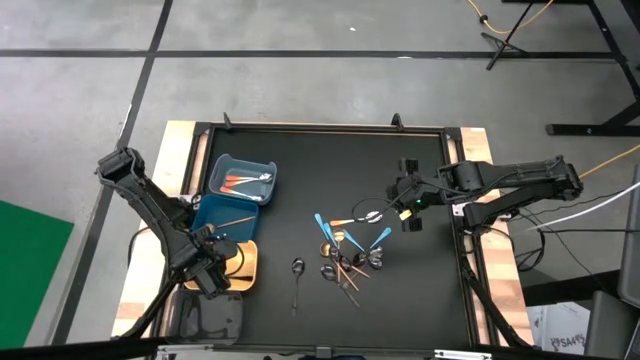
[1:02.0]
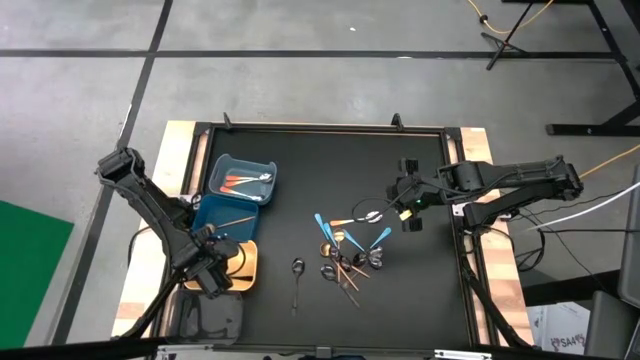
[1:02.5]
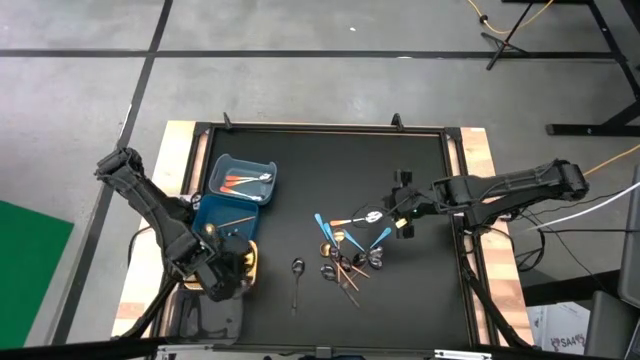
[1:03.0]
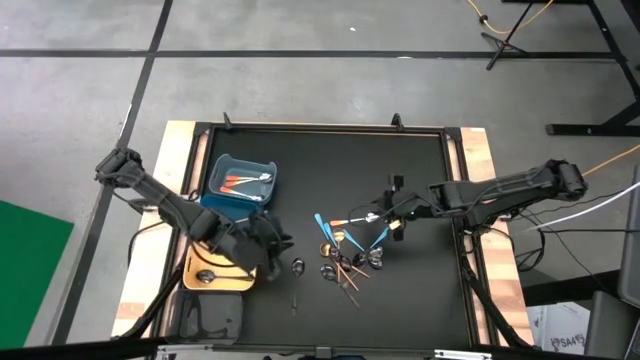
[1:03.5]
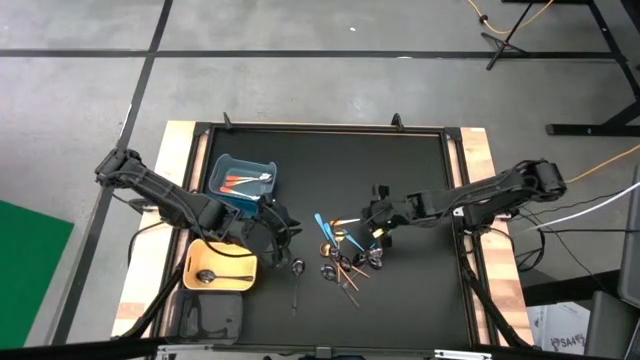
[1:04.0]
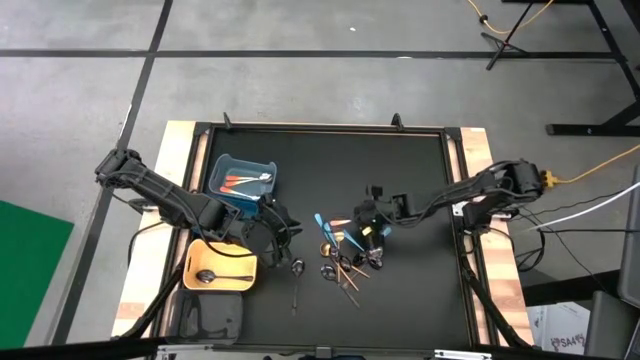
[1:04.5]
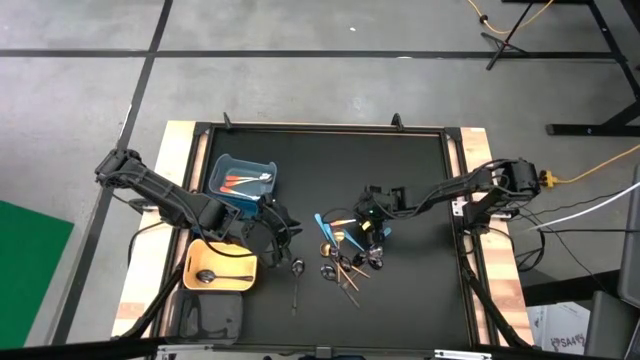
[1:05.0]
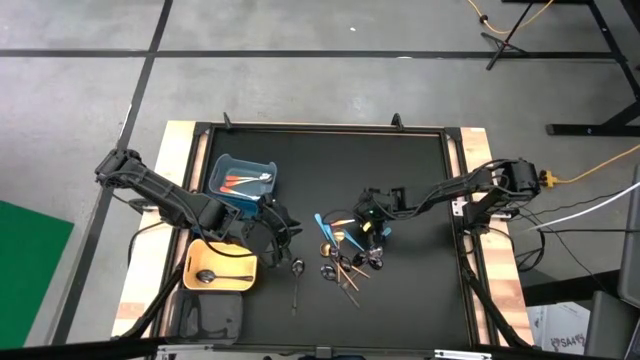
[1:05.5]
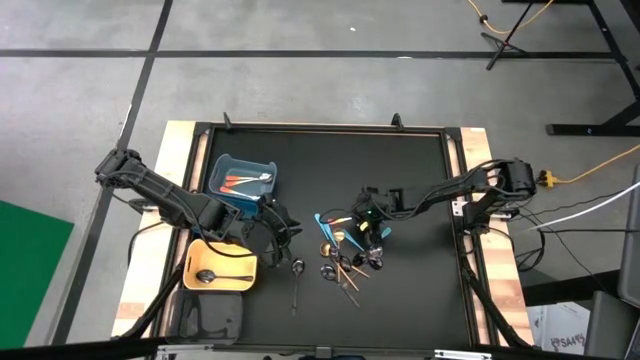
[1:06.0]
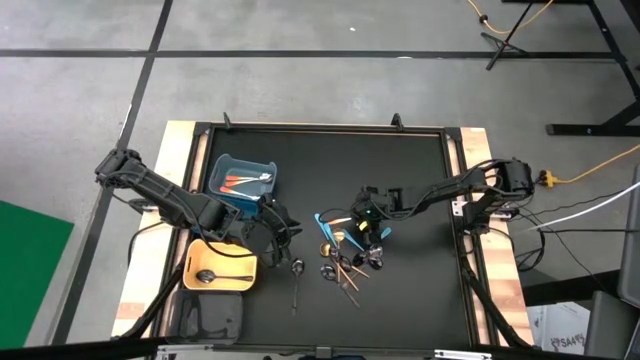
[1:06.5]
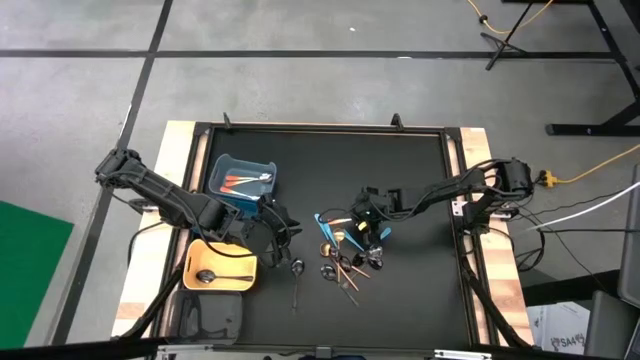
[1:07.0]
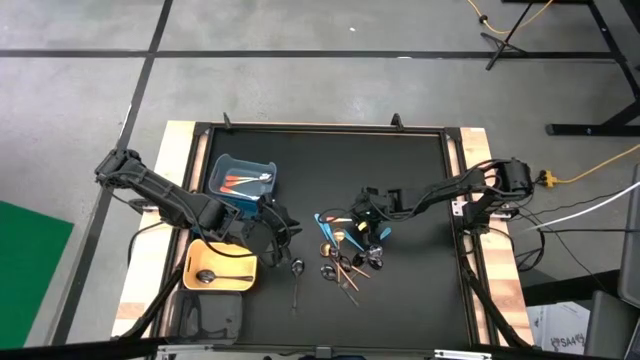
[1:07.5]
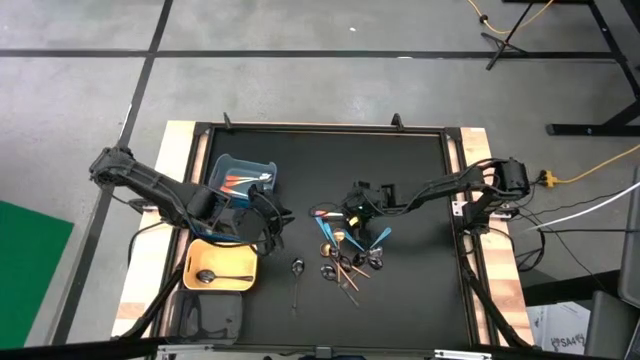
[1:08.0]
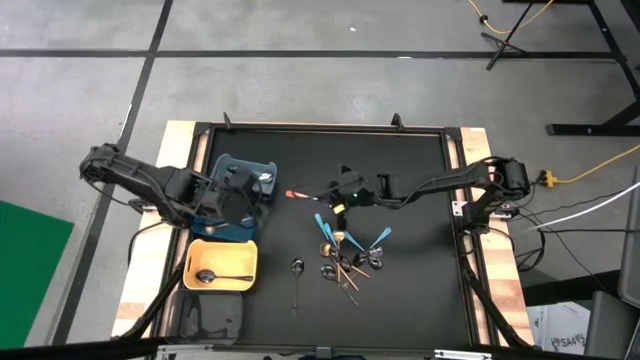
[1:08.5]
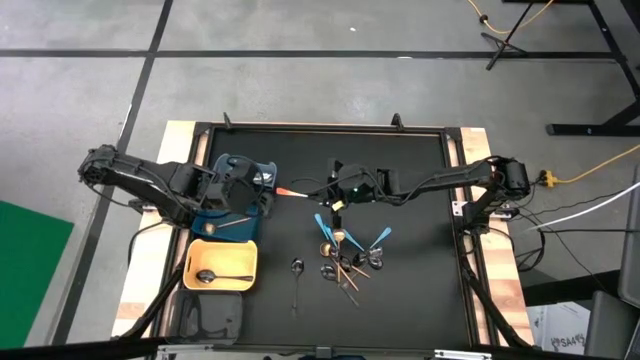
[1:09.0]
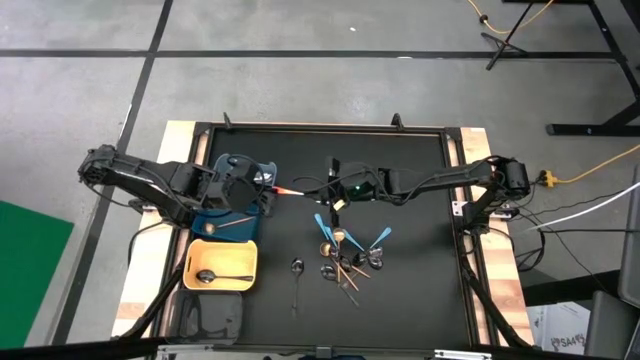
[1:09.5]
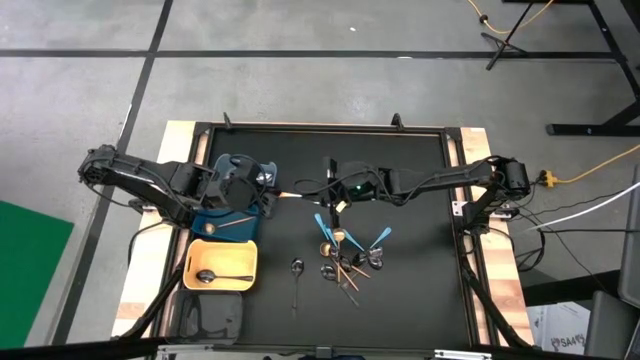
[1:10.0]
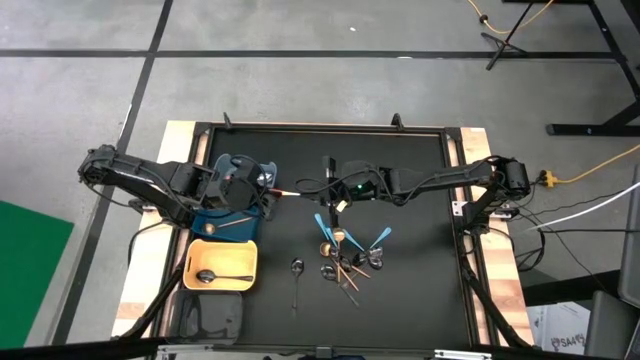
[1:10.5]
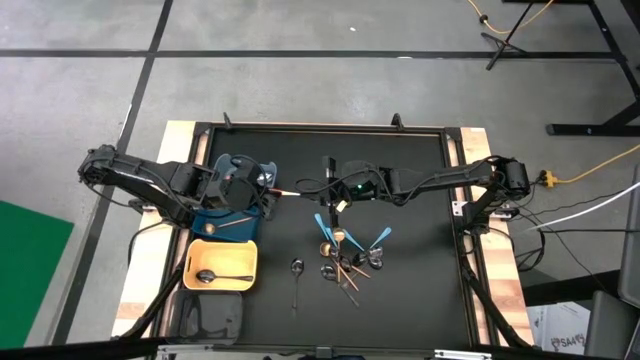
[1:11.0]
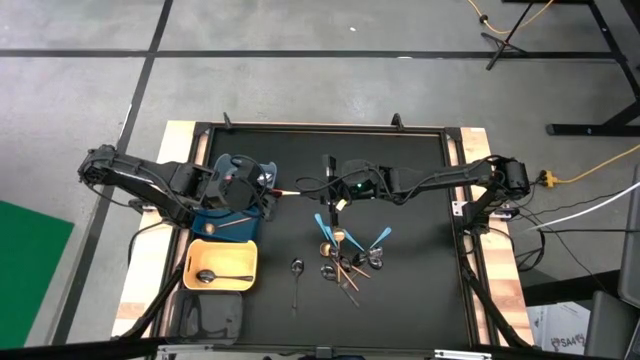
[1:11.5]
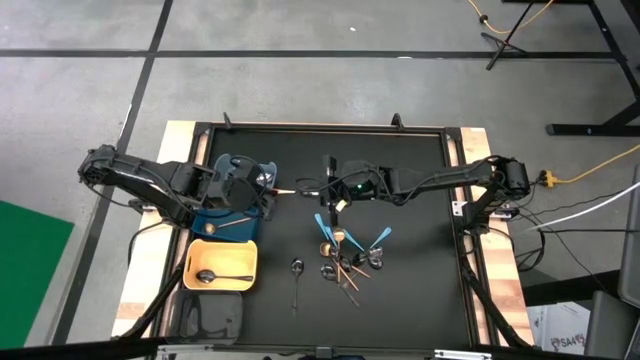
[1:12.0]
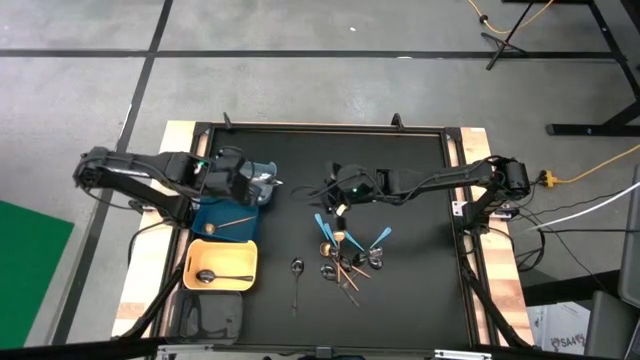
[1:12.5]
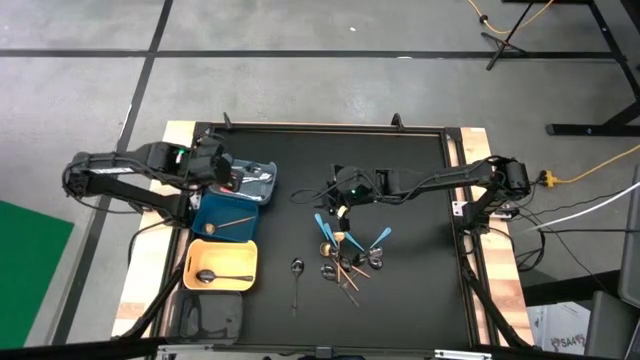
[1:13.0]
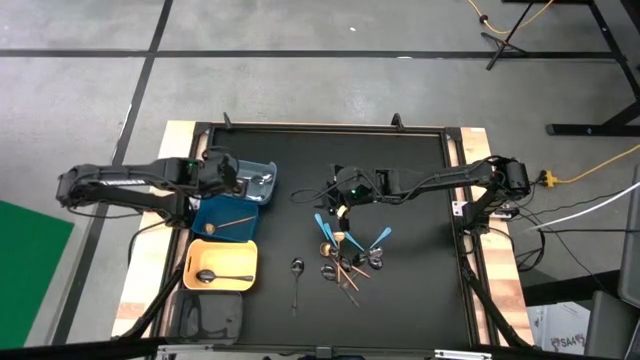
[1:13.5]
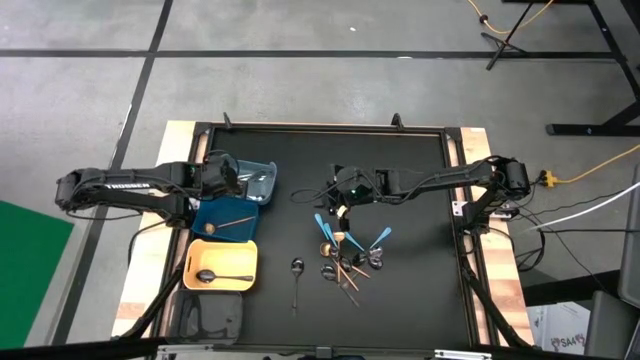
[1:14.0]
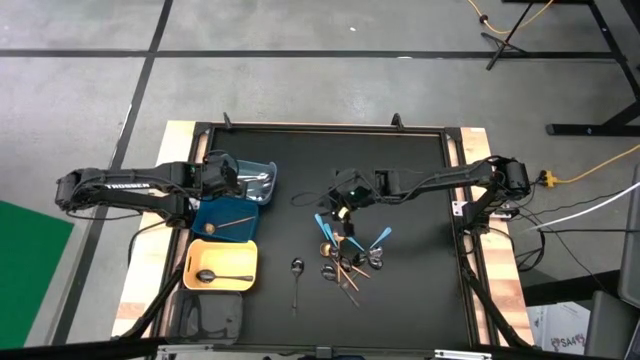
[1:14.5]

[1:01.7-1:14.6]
Task: Sort silverware by color (type)
Put the orange spoon into the light green bin

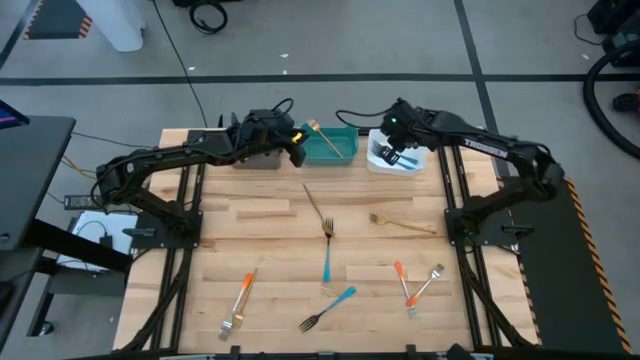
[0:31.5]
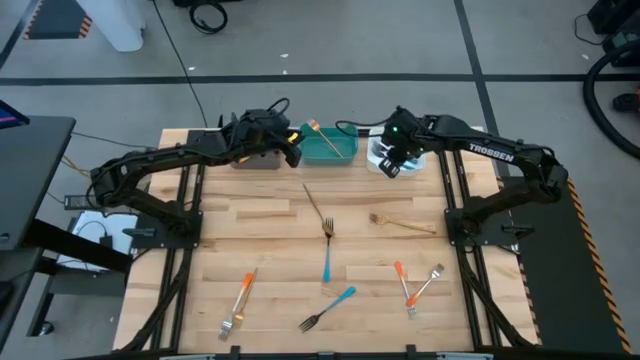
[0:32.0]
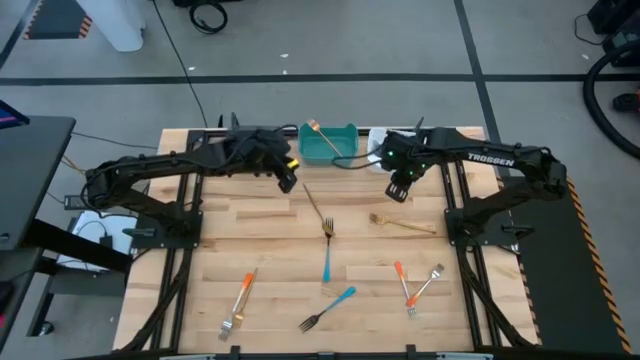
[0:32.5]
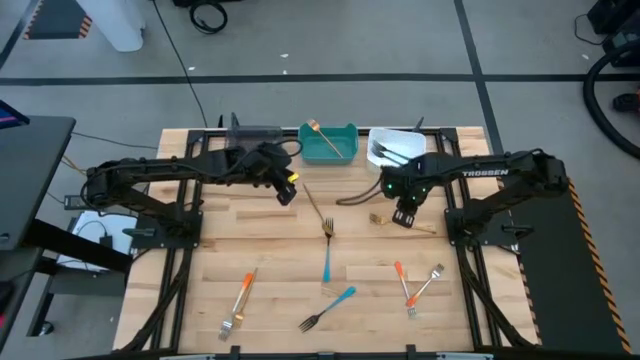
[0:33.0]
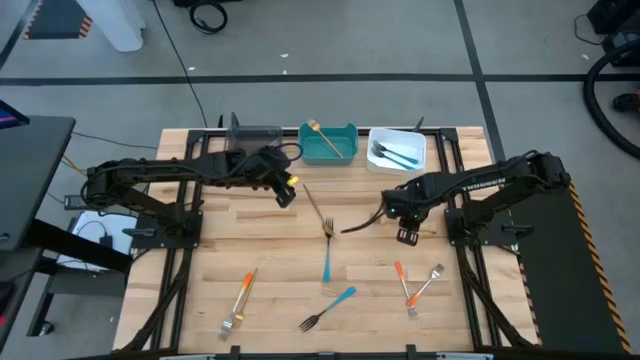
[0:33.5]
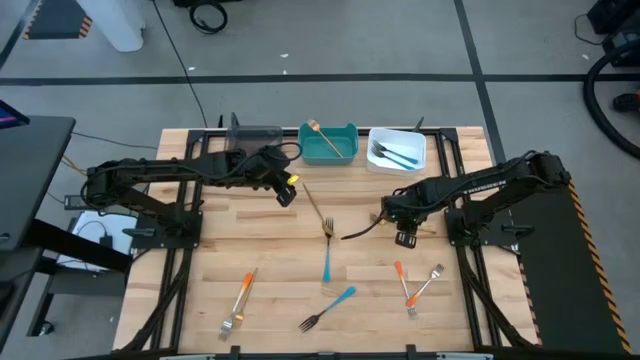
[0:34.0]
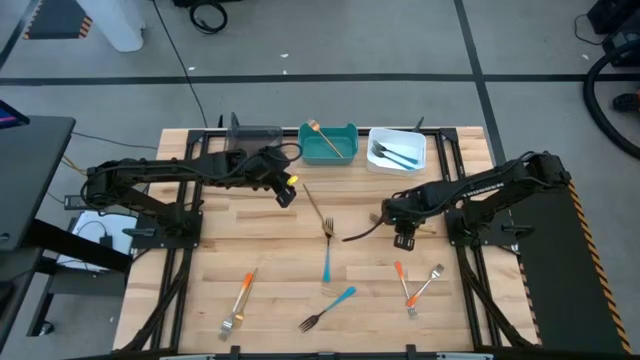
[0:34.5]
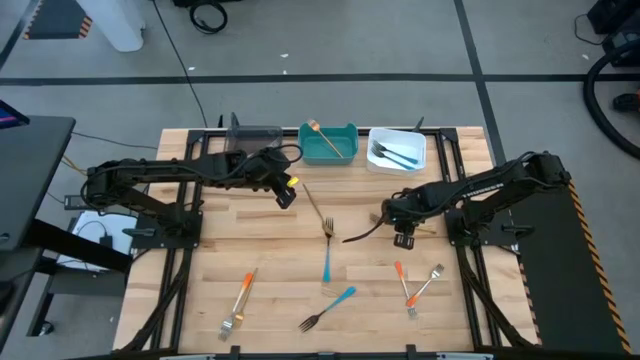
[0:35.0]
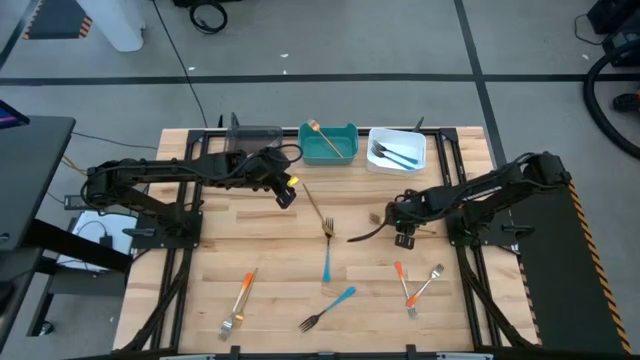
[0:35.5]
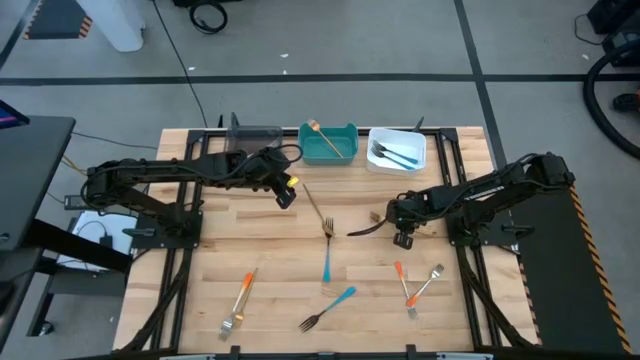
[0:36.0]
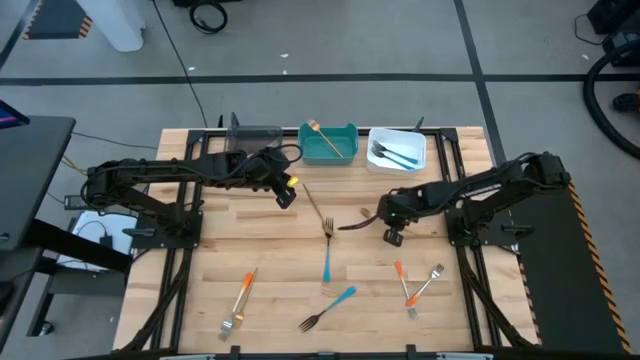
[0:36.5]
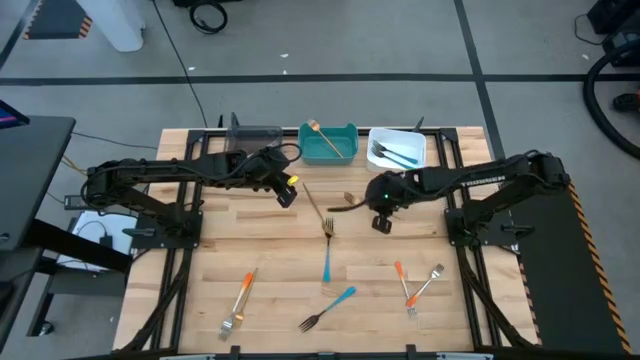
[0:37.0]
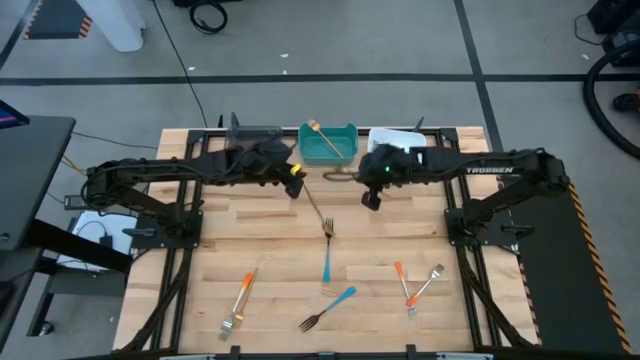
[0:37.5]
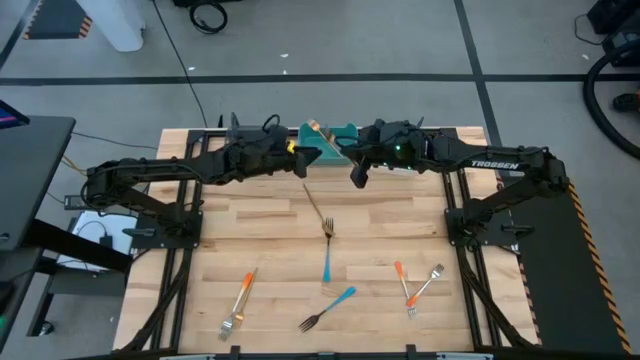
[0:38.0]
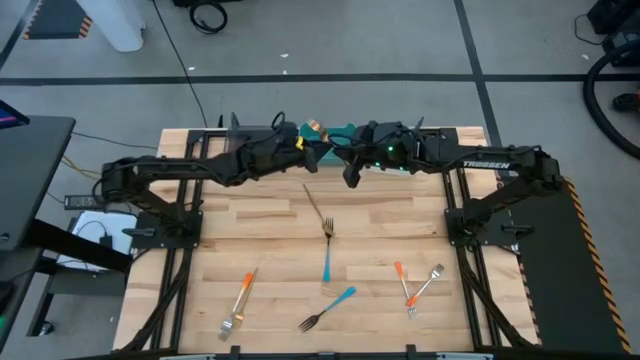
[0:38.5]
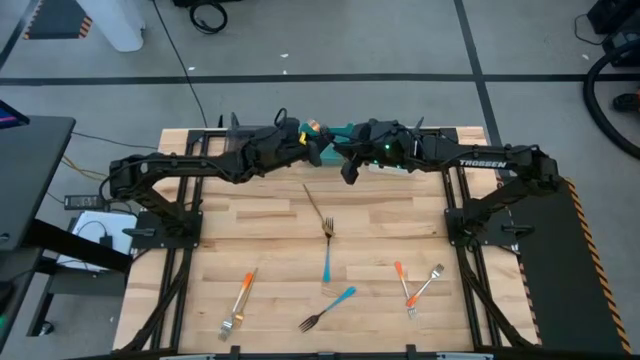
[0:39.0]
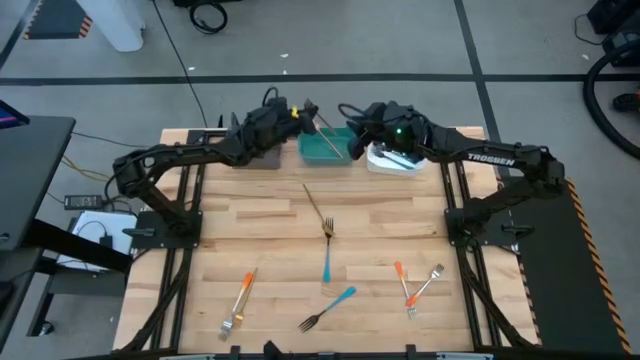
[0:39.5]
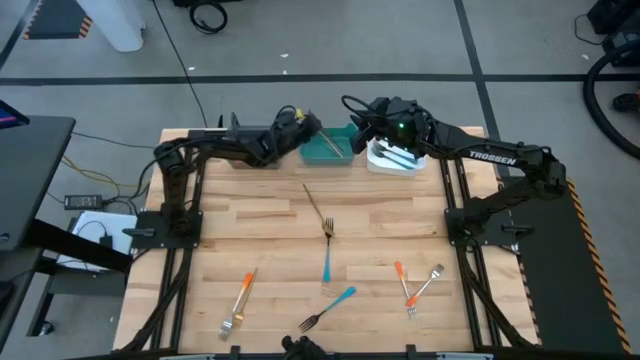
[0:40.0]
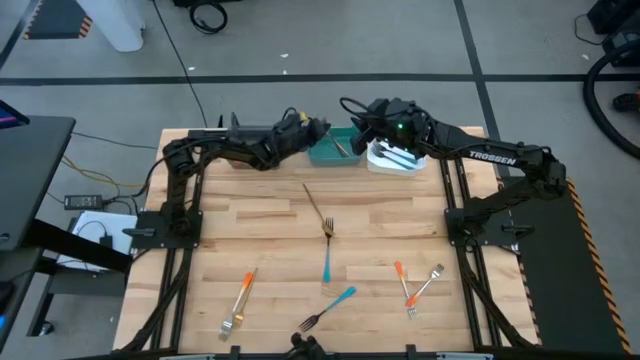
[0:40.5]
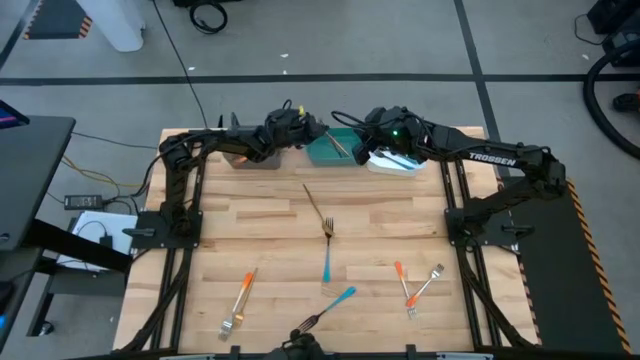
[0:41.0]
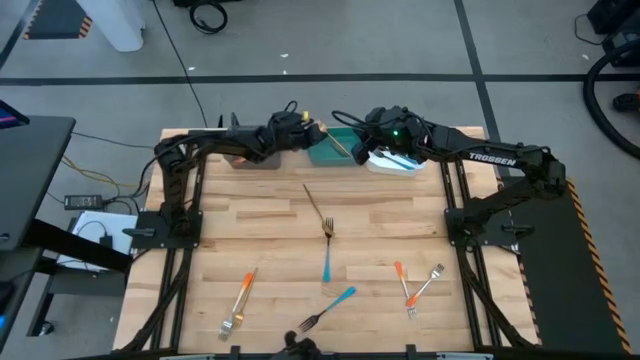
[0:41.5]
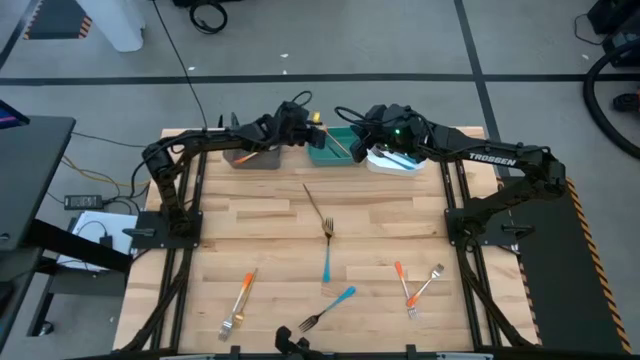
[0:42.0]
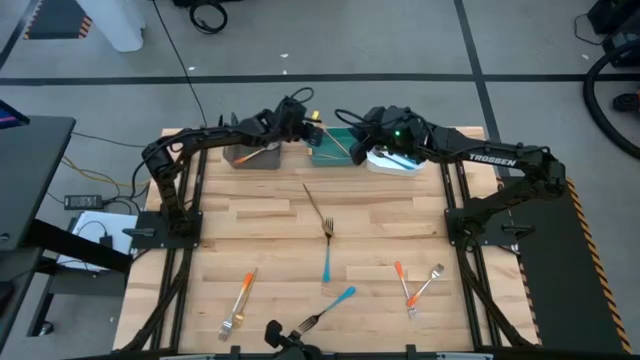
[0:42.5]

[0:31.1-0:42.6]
Task: Sort silverware by color (type)
Put the top right gold fork into the green bin
